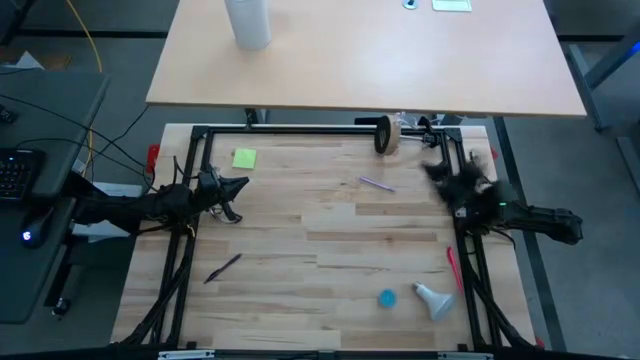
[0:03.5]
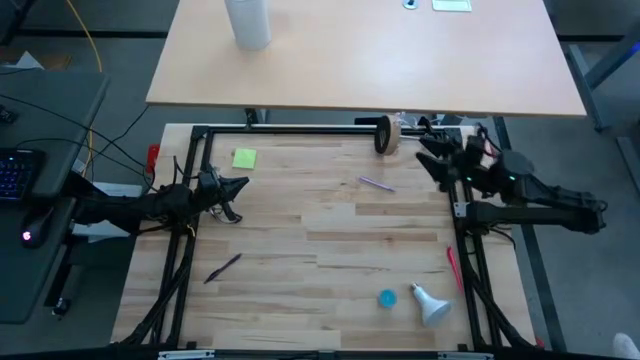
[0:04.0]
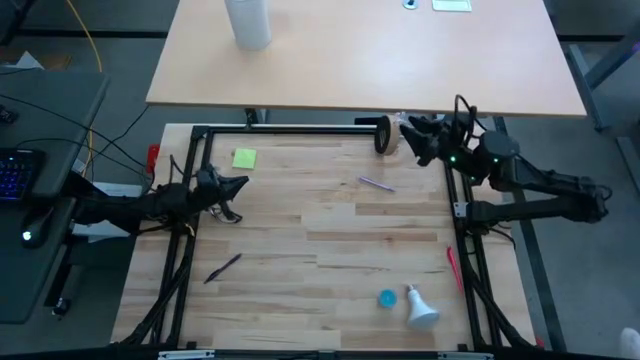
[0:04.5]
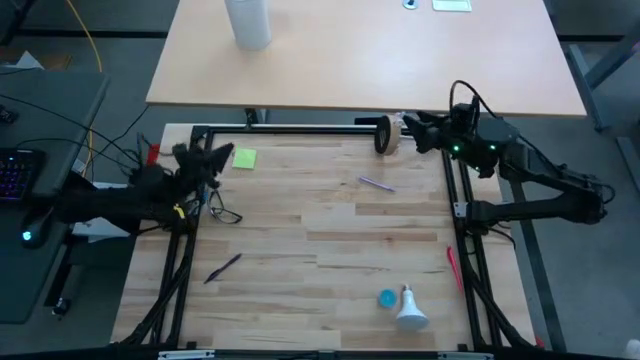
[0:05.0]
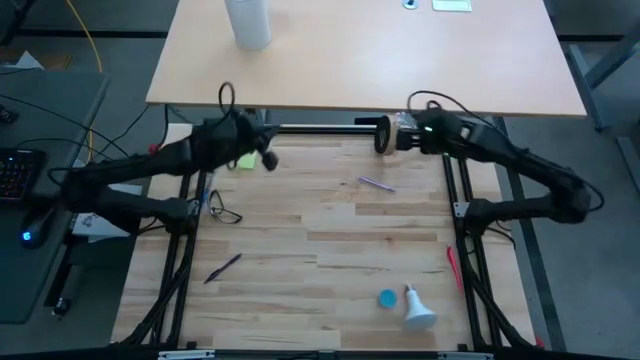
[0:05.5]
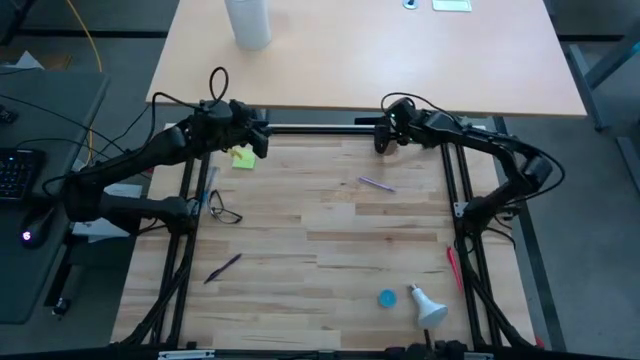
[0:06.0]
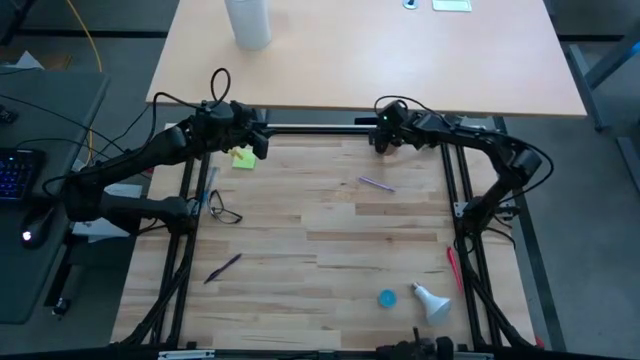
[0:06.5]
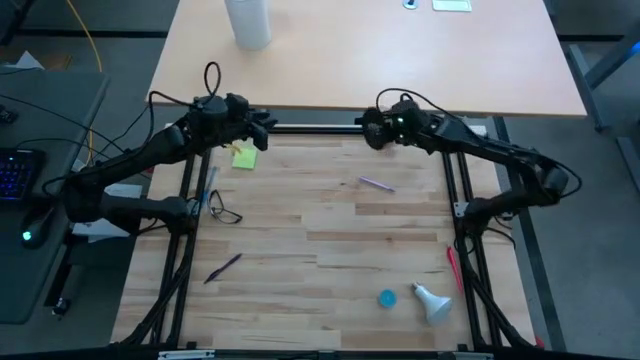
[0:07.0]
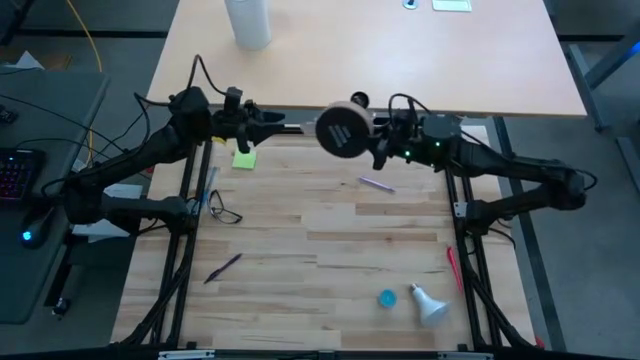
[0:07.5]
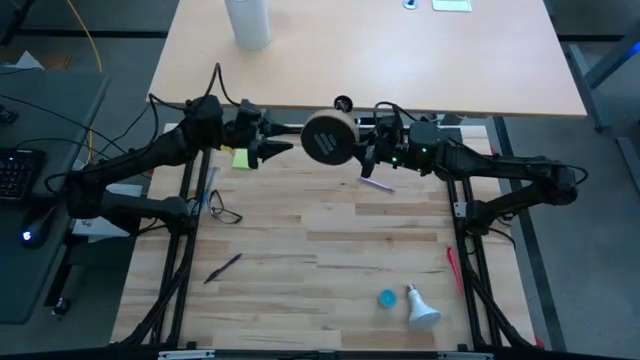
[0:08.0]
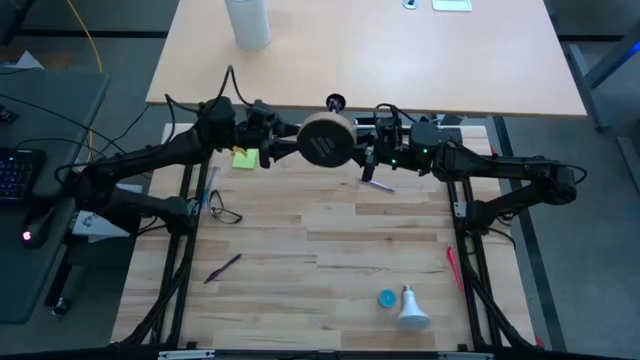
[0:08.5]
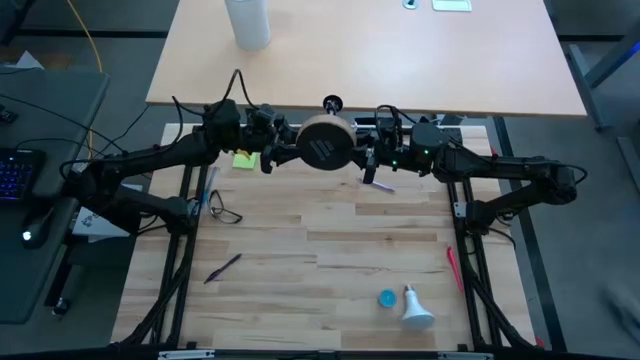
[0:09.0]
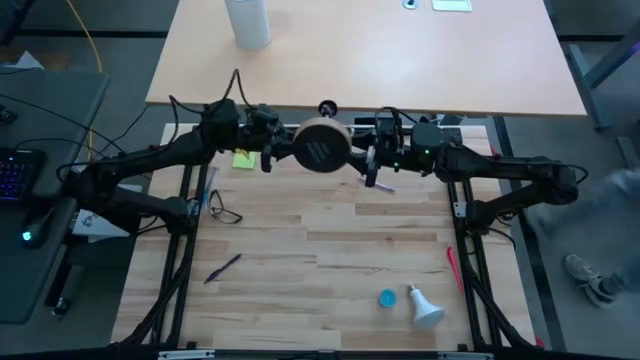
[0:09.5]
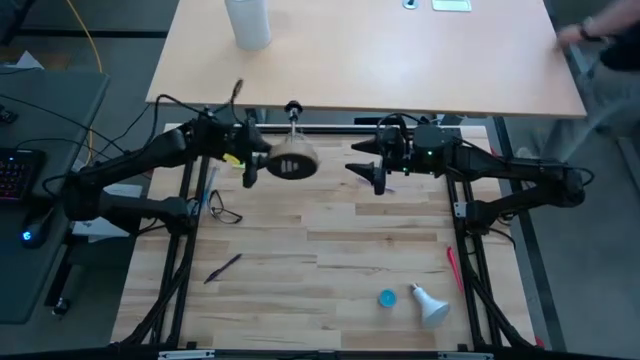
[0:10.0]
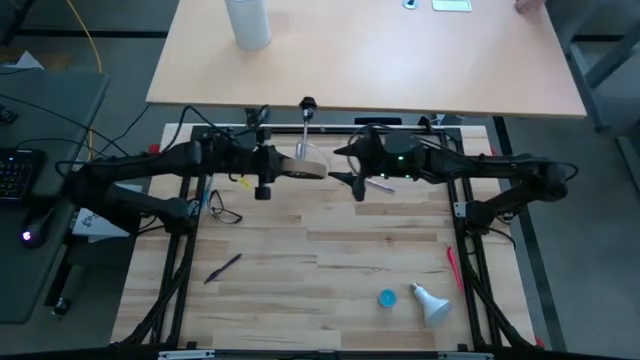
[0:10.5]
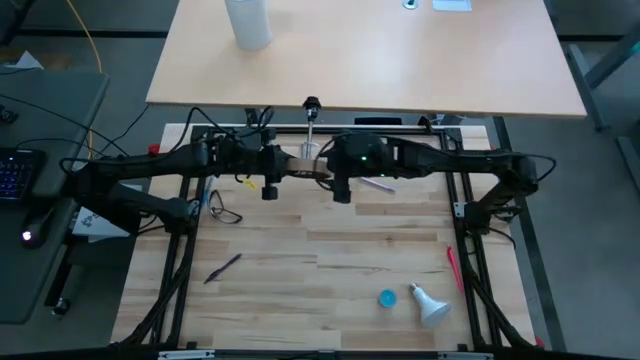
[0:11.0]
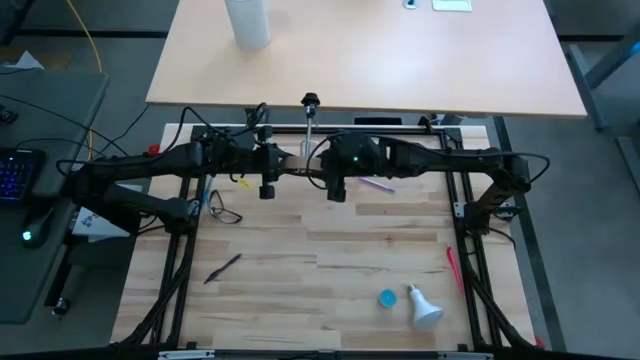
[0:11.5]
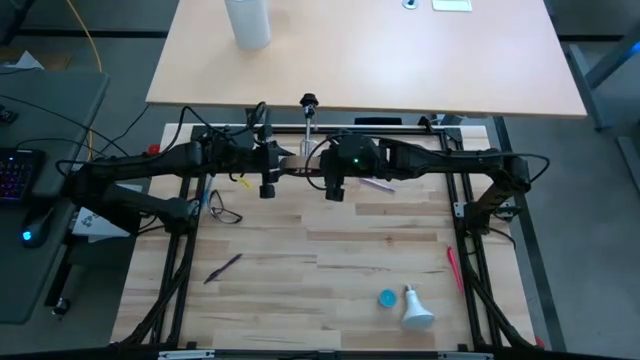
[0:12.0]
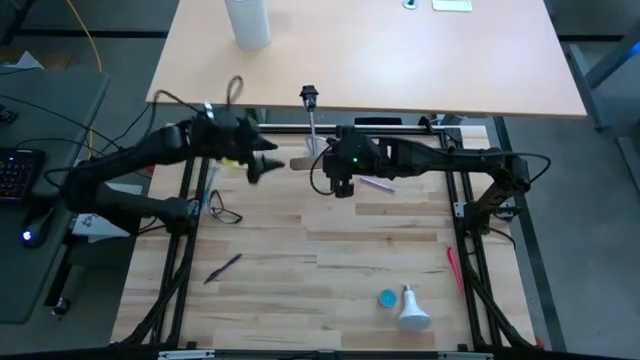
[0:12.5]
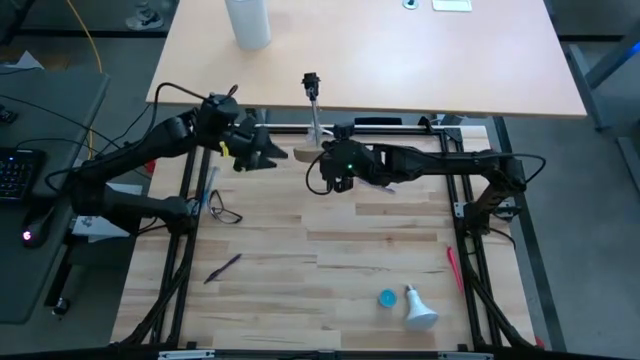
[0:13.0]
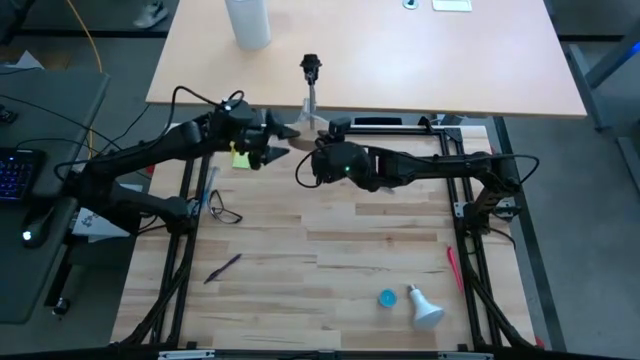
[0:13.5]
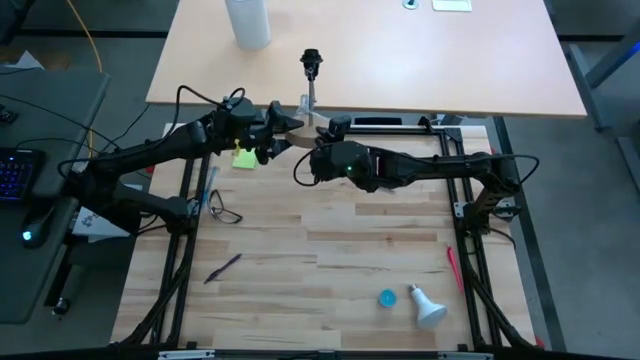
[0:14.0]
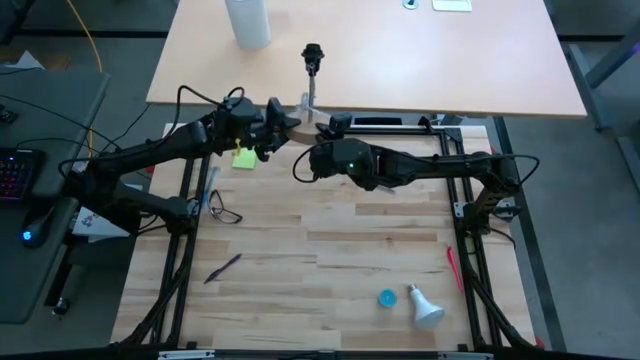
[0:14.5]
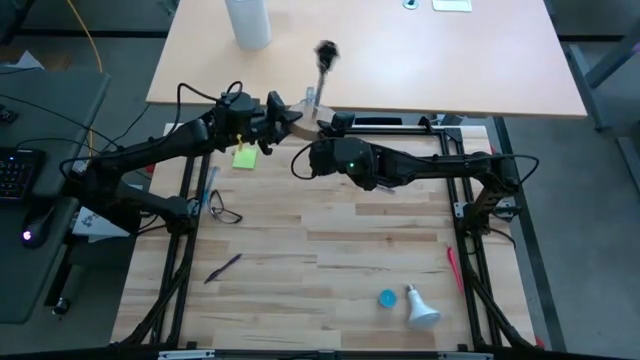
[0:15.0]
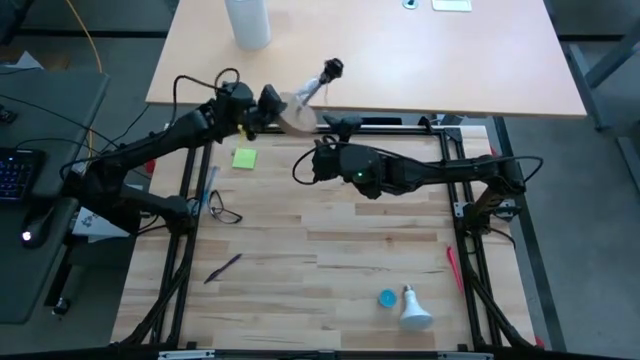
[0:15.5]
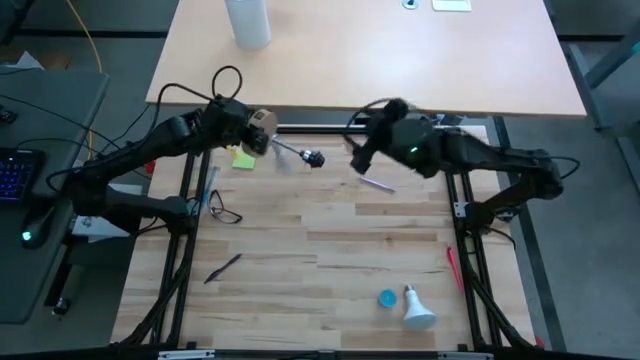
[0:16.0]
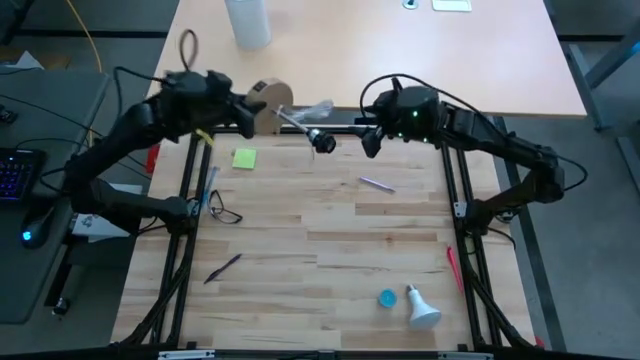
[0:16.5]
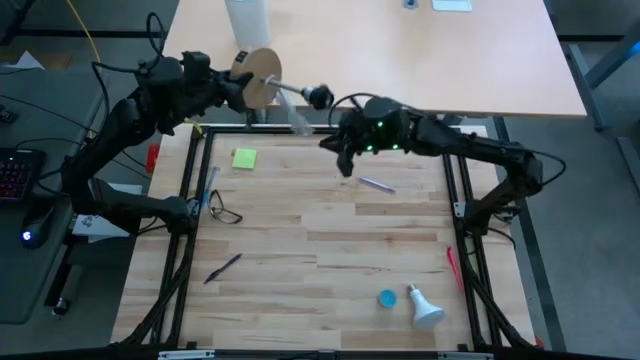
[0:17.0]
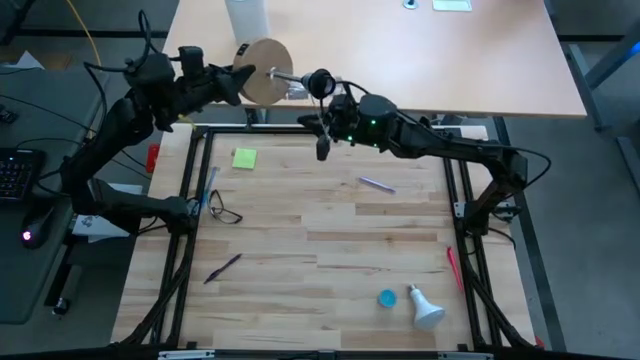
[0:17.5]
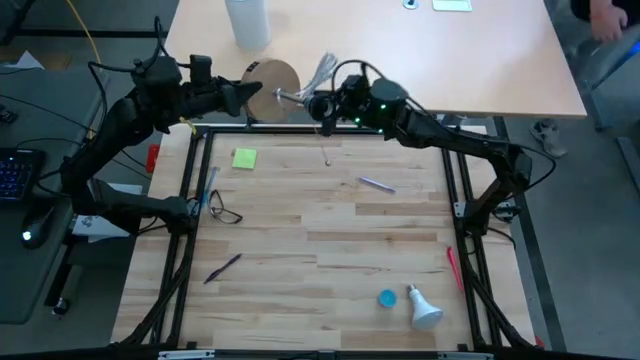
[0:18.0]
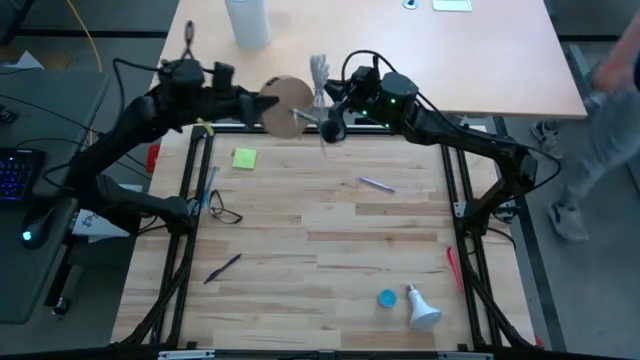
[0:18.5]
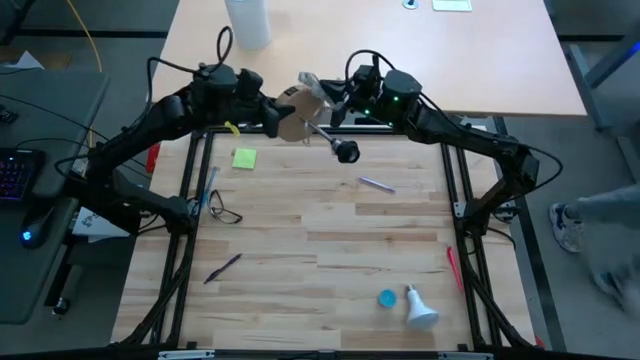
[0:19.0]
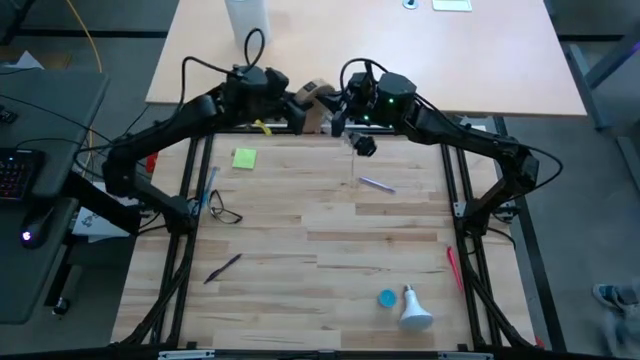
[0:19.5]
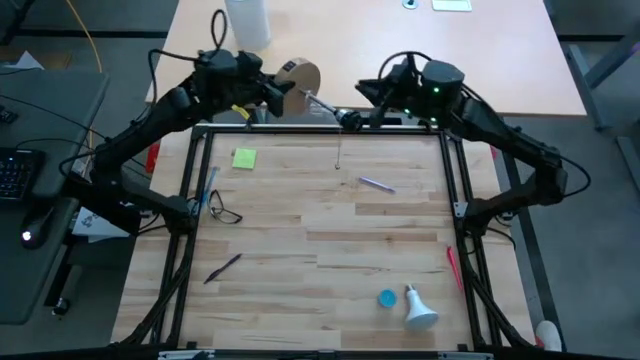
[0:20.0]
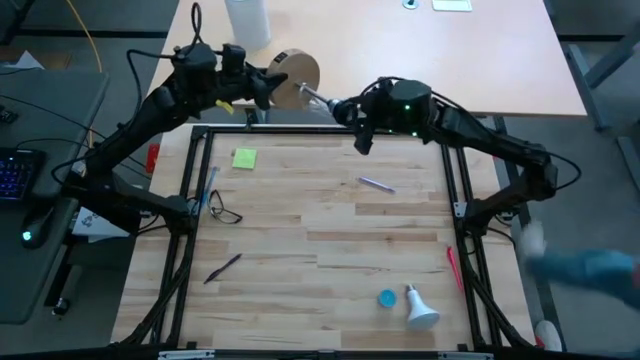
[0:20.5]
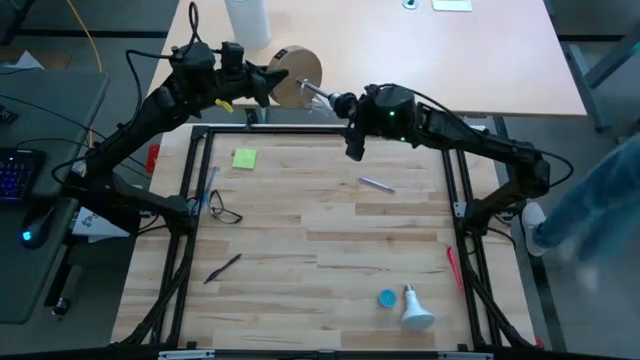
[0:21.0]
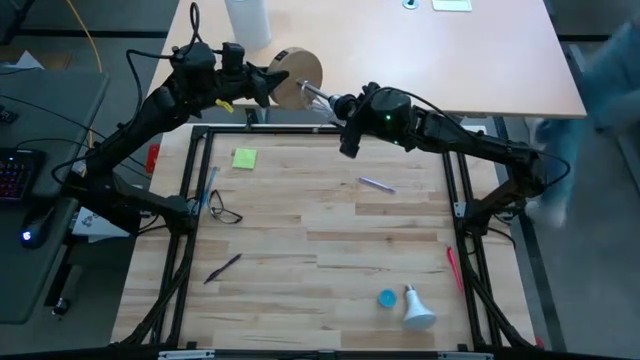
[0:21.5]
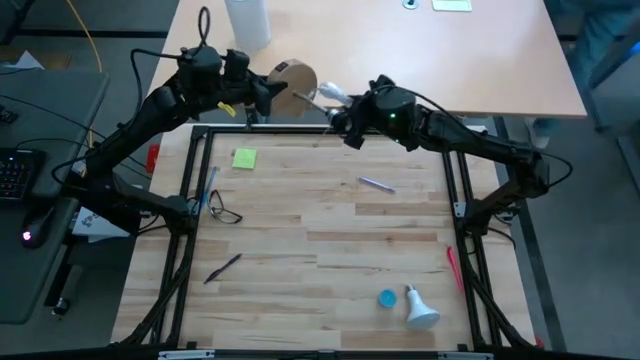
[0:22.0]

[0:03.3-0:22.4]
Task: Screw lightbulb
Insert the lightbulb into the lamp
